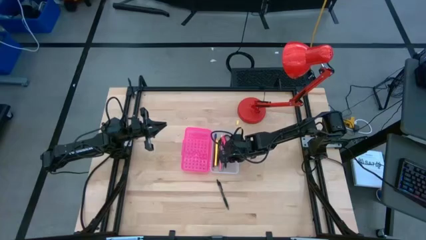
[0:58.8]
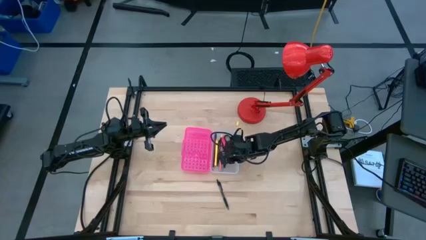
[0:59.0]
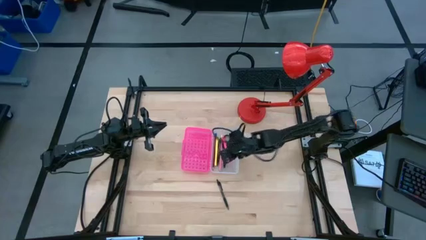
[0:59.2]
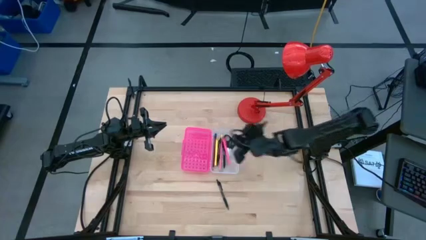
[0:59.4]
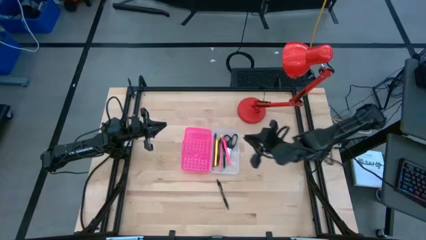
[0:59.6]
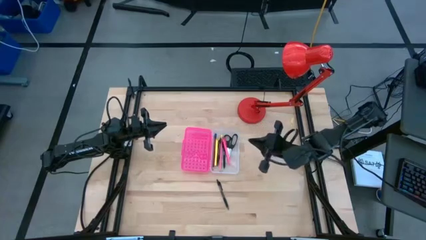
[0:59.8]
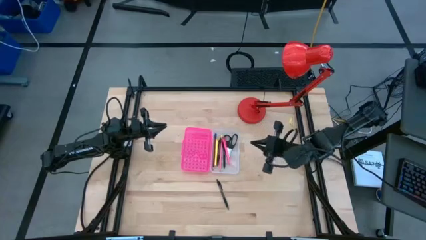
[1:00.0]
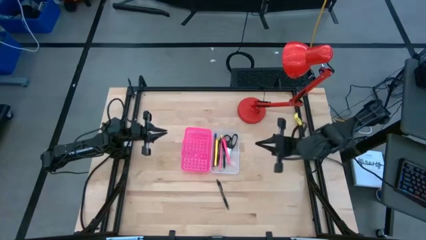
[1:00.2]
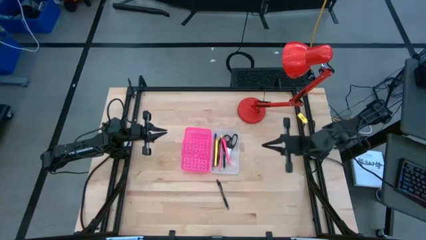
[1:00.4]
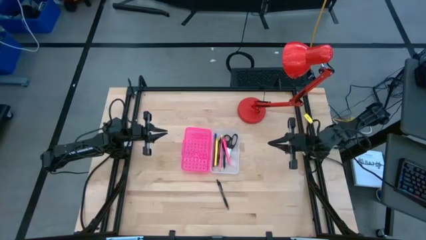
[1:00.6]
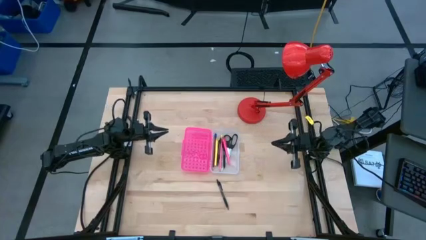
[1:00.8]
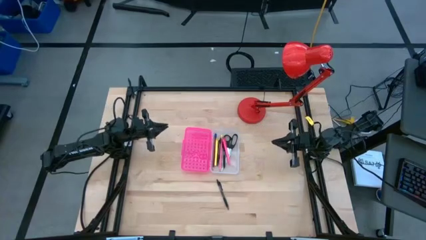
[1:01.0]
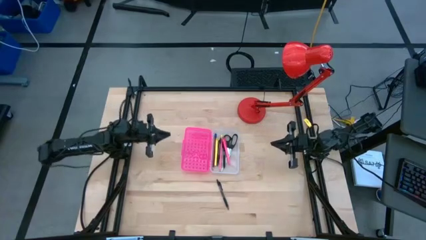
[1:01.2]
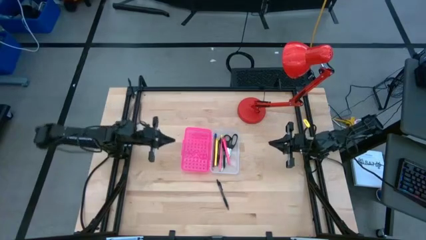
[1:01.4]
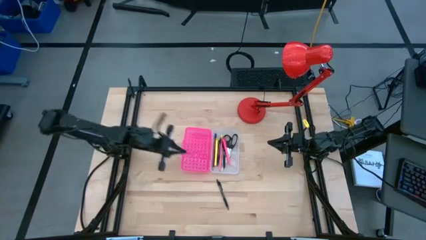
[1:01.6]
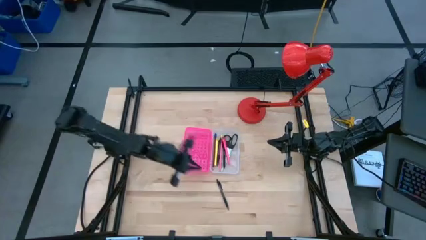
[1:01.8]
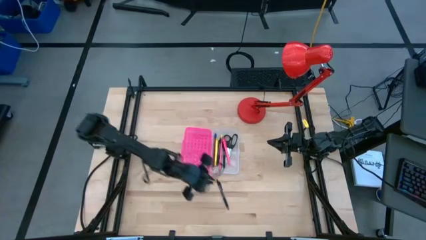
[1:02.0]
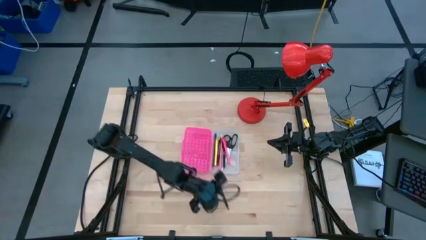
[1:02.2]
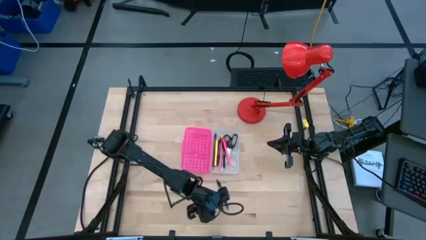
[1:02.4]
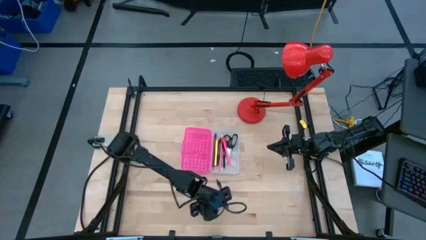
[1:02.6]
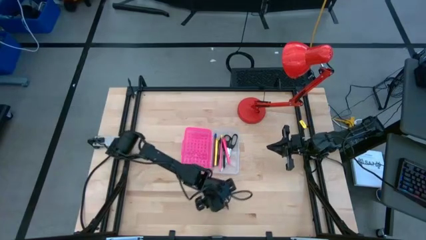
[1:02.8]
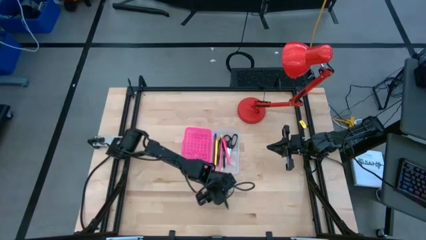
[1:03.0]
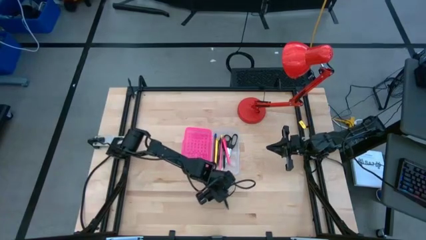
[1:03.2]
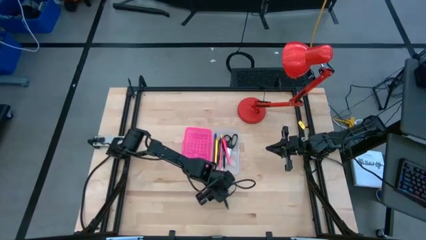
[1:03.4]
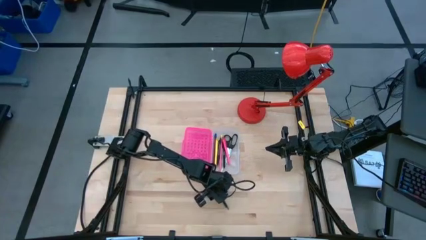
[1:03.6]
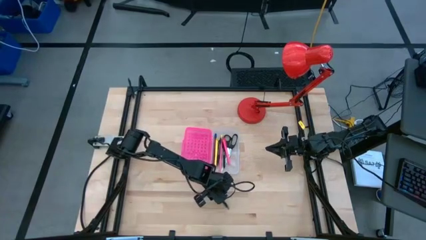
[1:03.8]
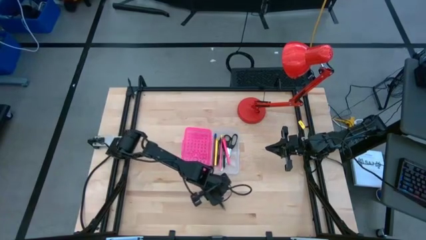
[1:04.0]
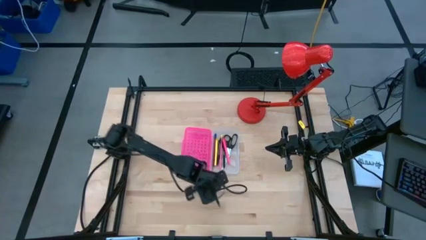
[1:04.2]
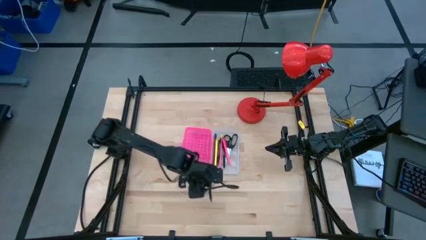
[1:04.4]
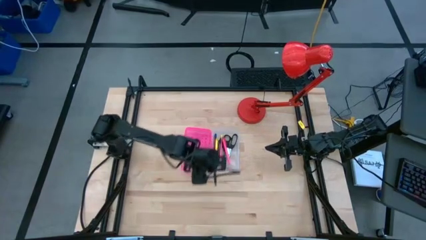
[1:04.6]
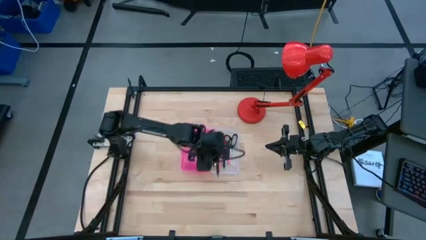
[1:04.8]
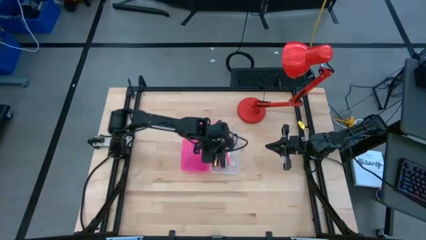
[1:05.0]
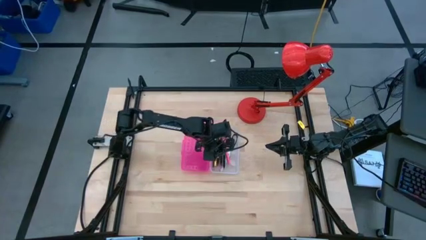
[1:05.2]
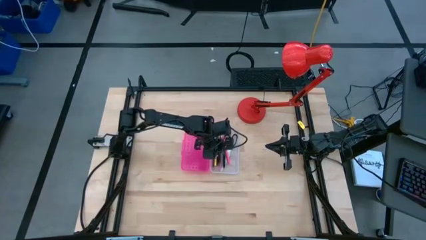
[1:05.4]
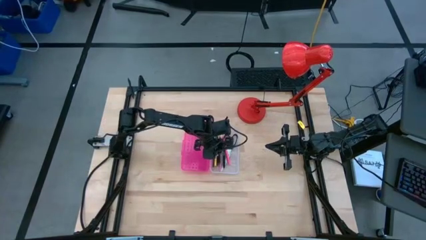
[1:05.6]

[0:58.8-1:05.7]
Task: Pick & place school supplies into a supply box
Put the black pen into the pink supply box

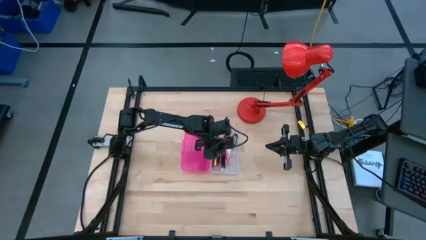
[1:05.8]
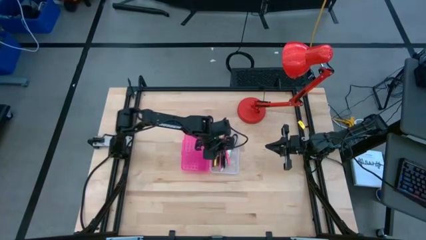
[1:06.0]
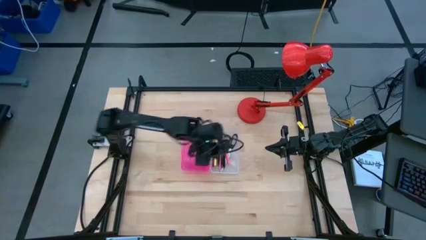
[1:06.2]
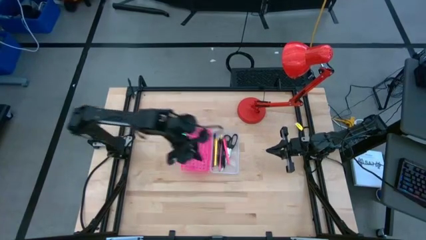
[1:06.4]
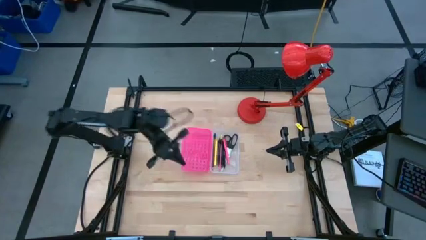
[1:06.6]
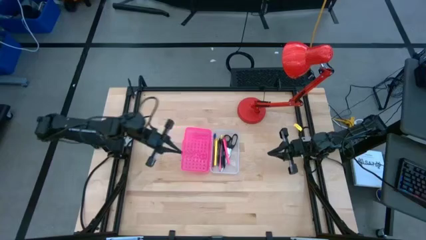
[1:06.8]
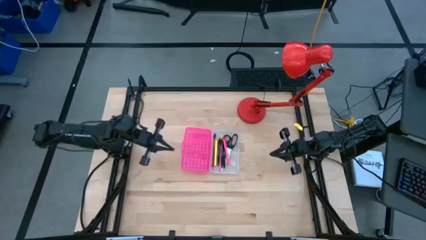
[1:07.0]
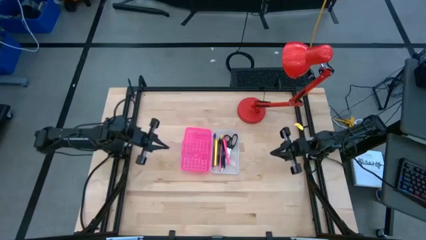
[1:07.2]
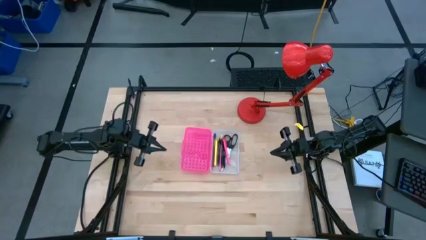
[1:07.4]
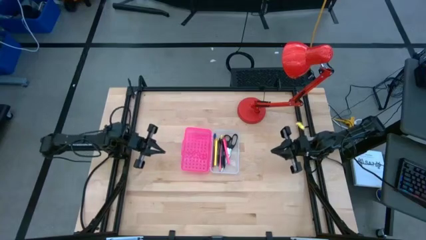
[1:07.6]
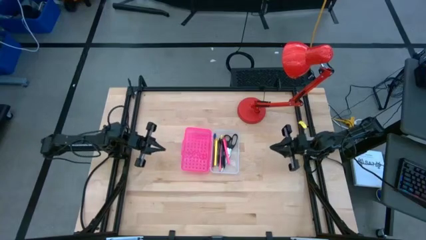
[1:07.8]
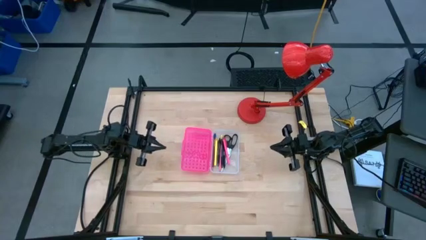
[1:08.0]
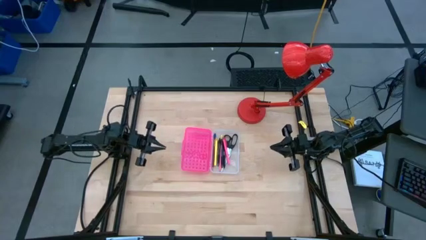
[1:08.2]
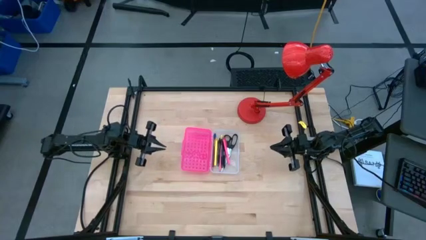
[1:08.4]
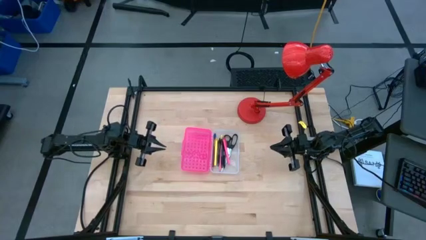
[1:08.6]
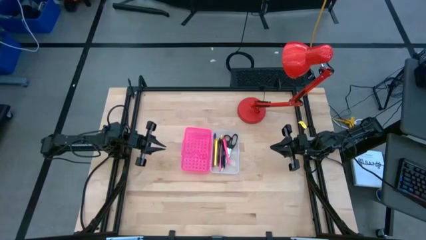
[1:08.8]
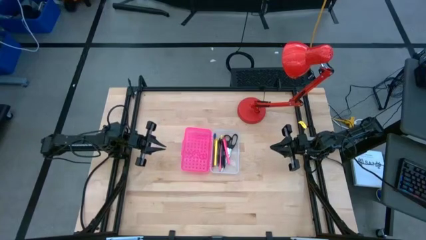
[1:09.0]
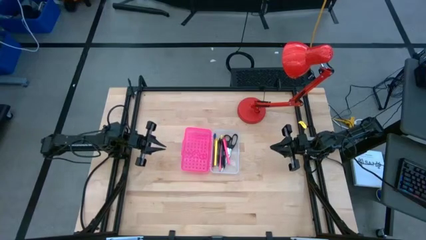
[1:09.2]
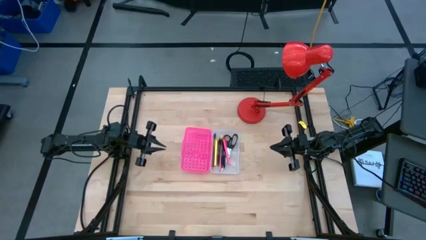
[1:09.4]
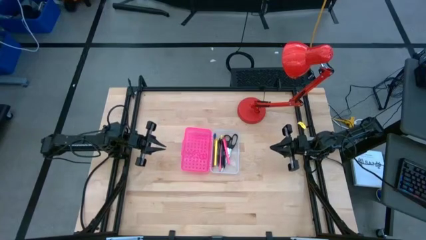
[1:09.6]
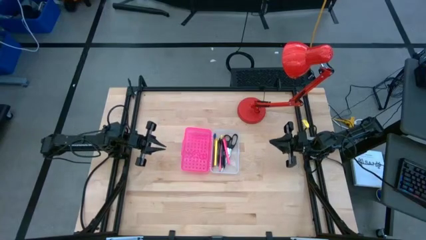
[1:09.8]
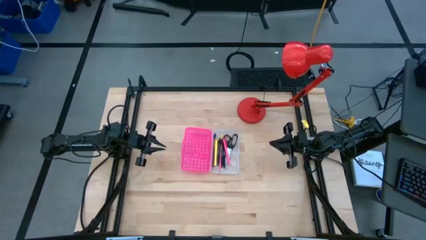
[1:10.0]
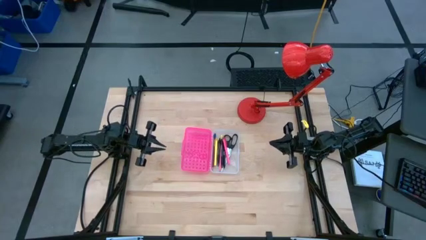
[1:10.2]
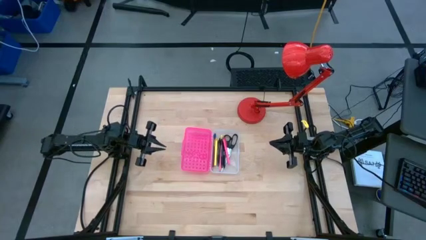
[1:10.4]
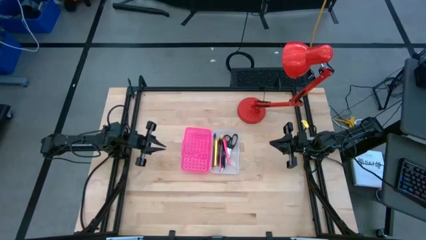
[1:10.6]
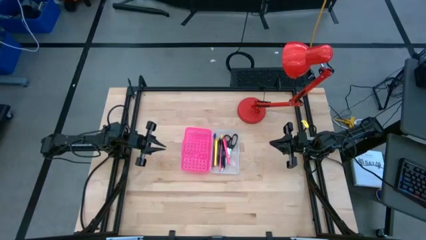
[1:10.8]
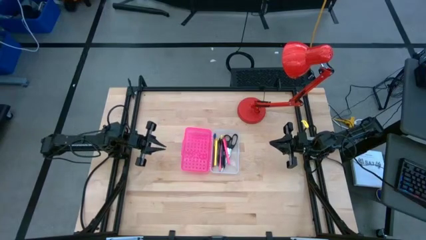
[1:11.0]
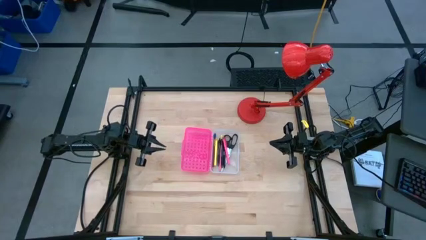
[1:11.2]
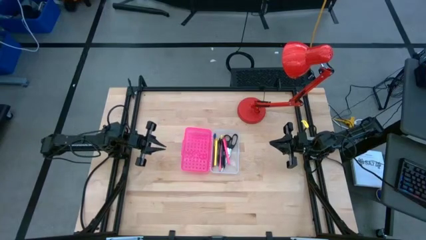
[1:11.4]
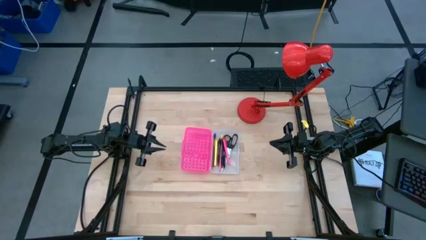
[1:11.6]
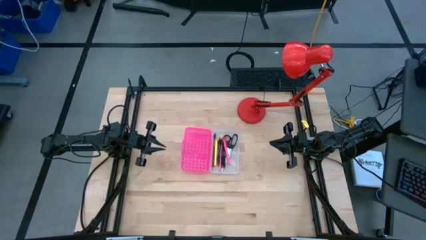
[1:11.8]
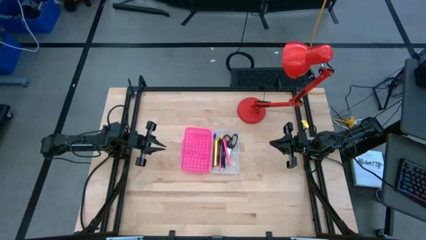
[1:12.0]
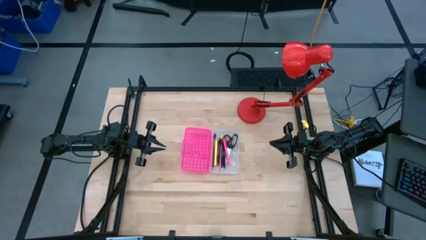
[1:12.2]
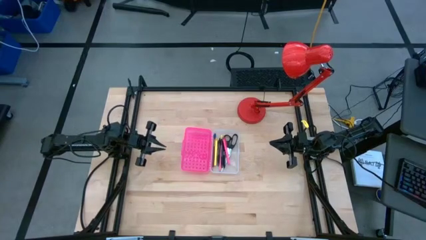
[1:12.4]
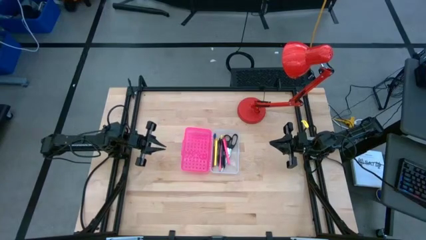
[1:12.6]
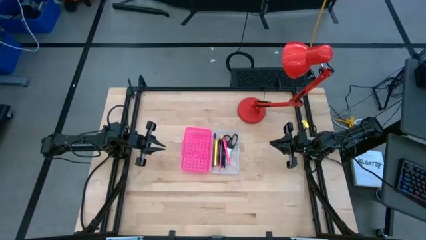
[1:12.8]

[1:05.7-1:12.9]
Return to Home Position

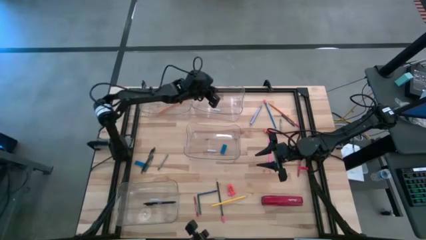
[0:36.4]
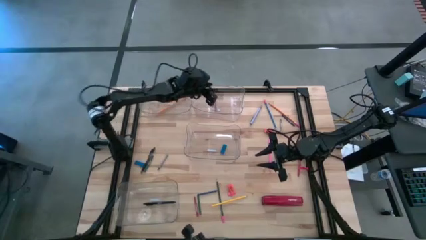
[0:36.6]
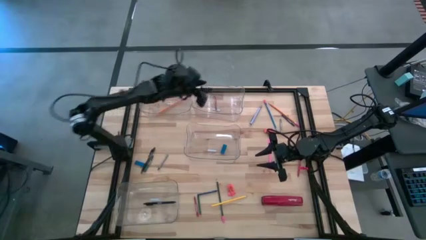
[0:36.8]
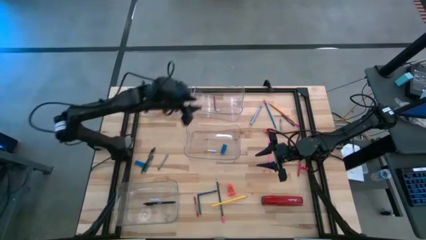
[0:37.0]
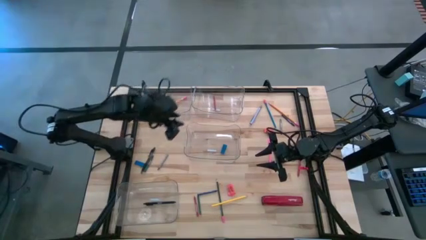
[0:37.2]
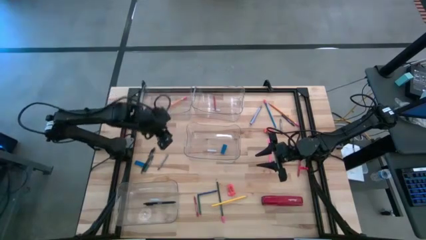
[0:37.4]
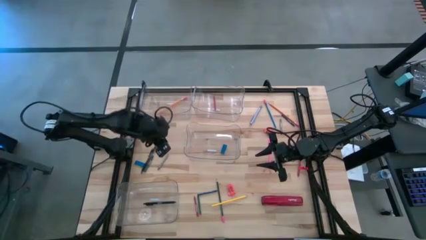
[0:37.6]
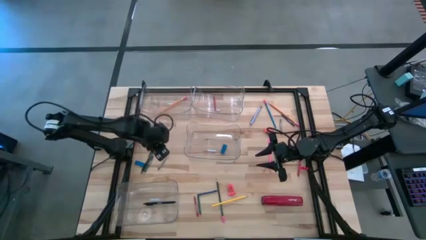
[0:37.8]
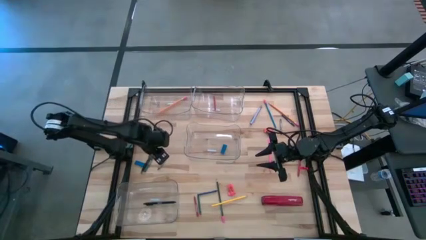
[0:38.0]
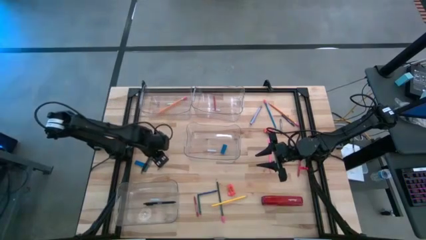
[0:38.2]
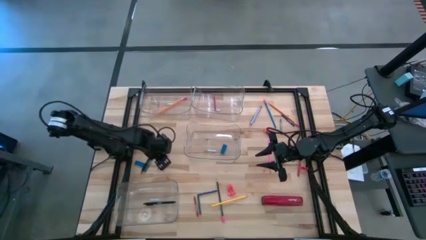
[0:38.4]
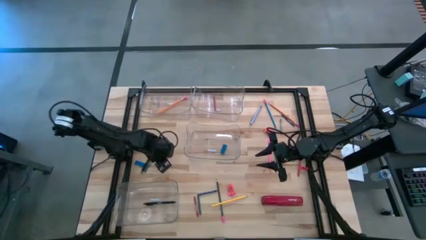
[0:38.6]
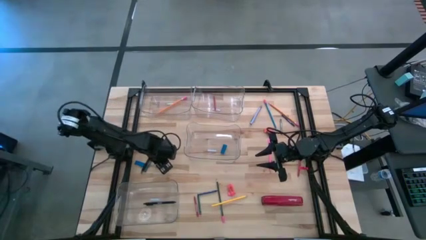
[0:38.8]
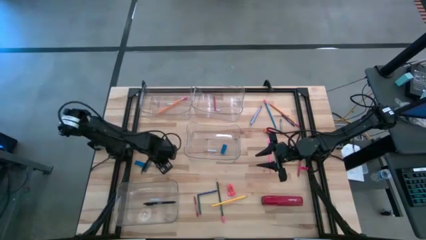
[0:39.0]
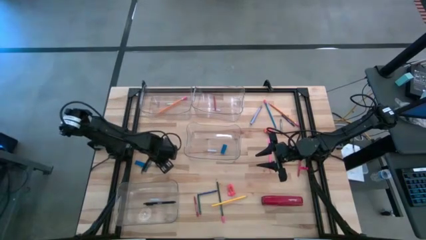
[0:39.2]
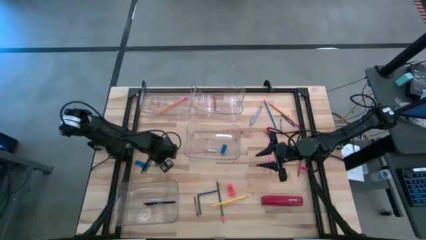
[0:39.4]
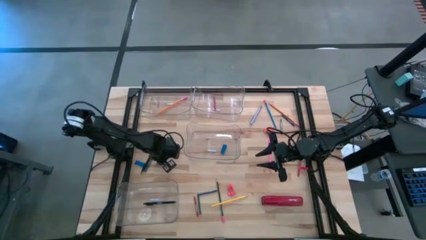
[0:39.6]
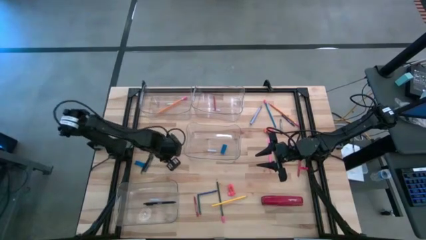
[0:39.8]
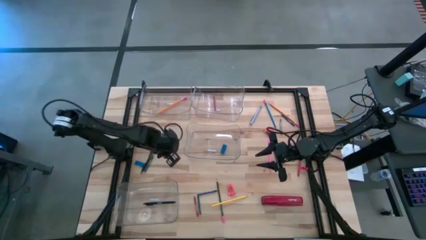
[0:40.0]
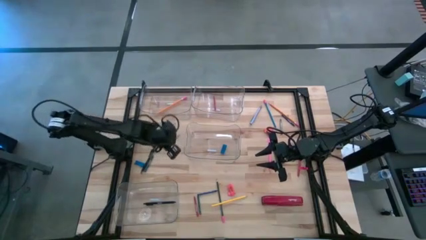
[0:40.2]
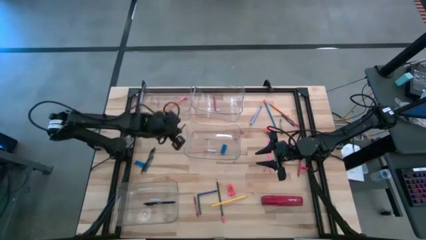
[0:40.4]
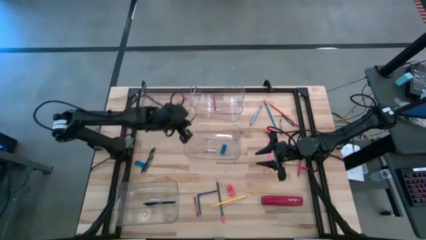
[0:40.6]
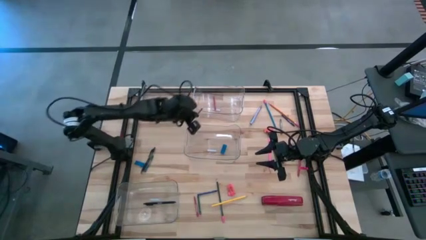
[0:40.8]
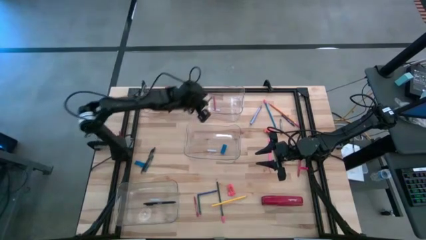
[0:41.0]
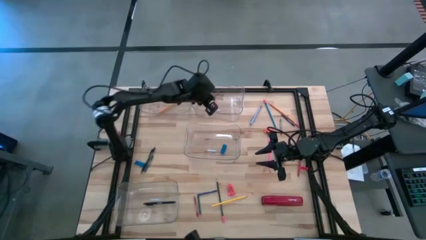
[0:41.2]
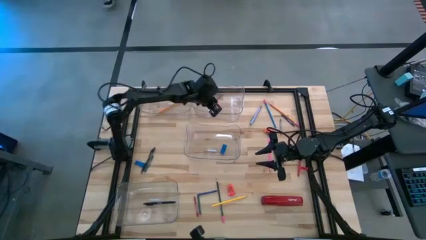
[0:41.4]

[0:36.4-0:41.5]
Task: Sort crayons/erasers/pens/pencils in bins
Put the bottom gray crayon into the top right transparent bin
